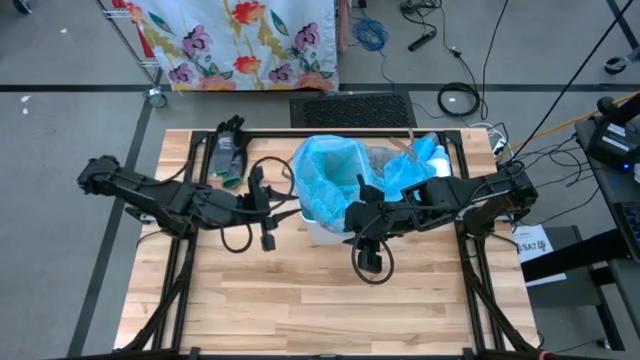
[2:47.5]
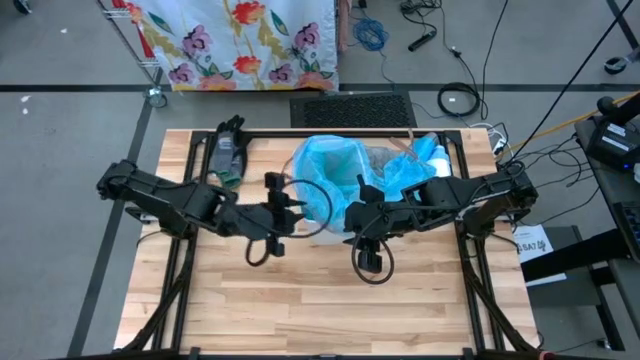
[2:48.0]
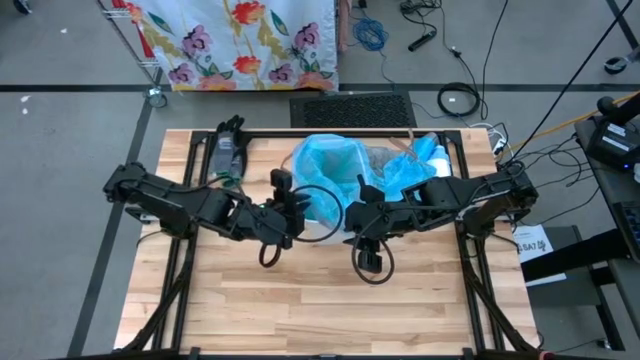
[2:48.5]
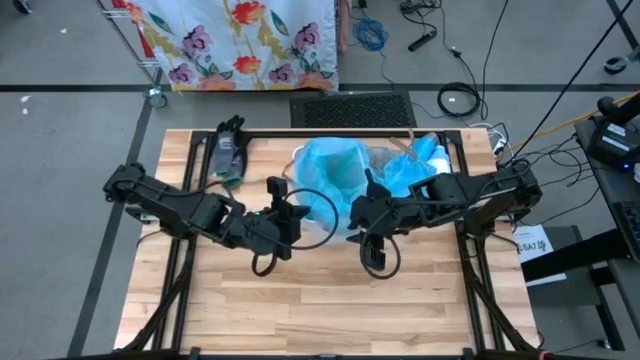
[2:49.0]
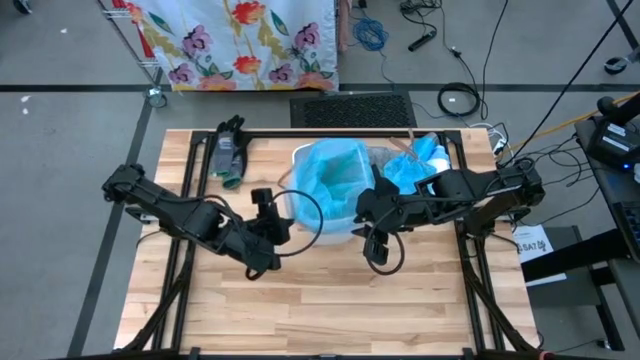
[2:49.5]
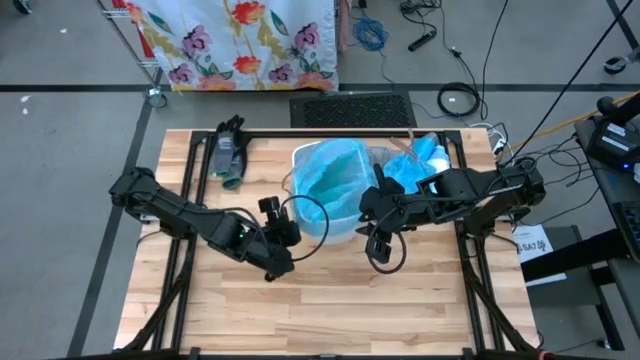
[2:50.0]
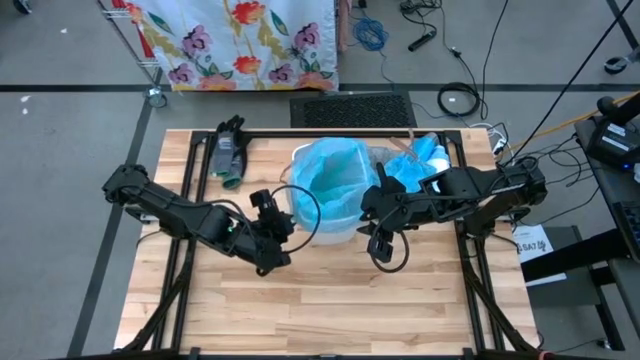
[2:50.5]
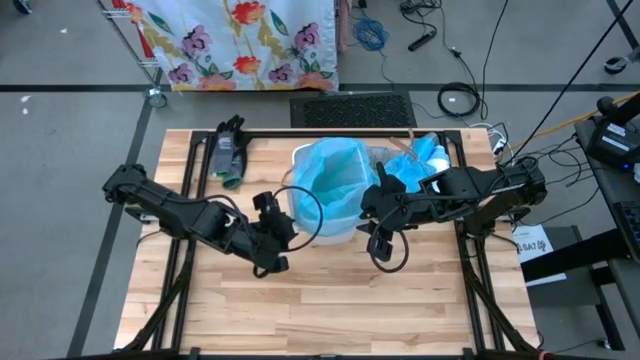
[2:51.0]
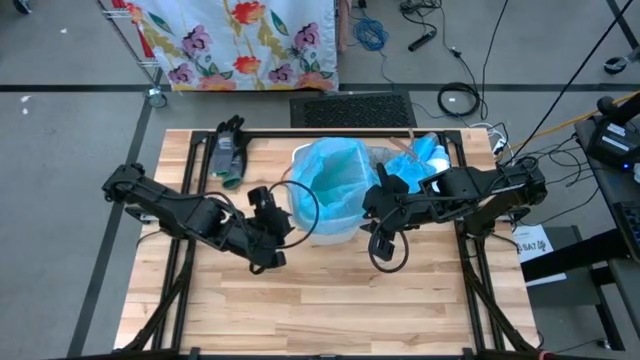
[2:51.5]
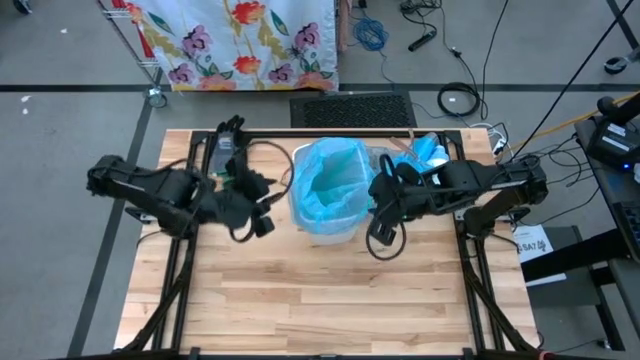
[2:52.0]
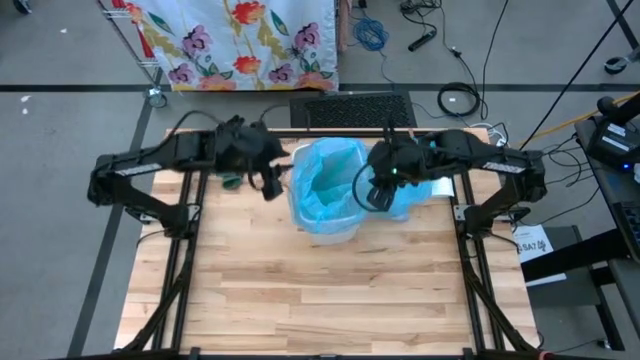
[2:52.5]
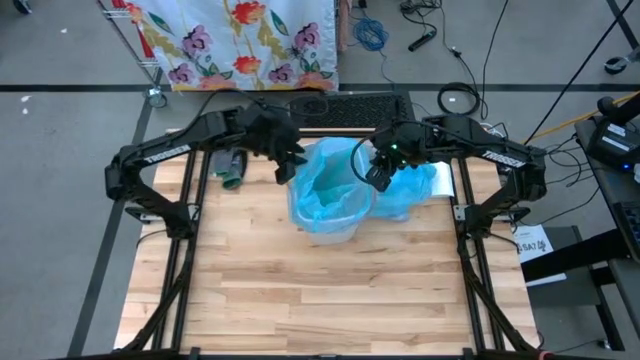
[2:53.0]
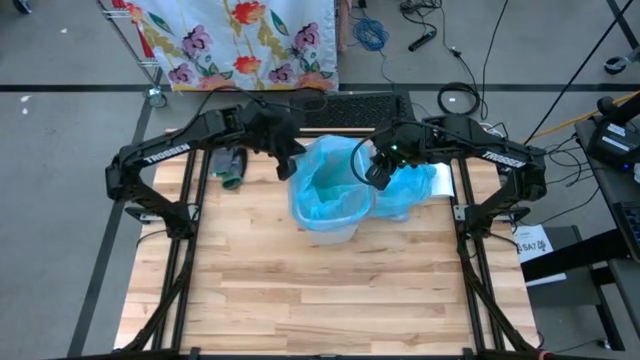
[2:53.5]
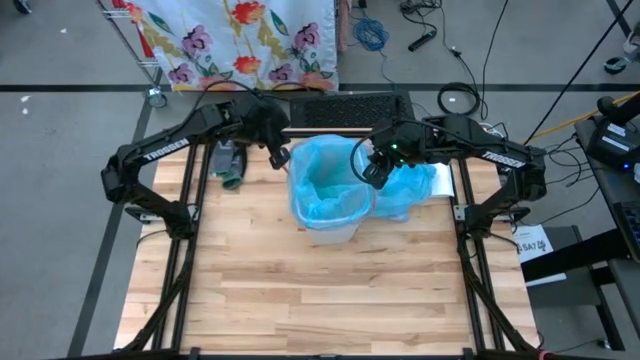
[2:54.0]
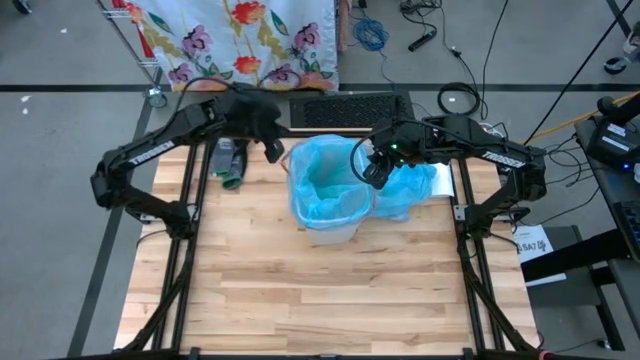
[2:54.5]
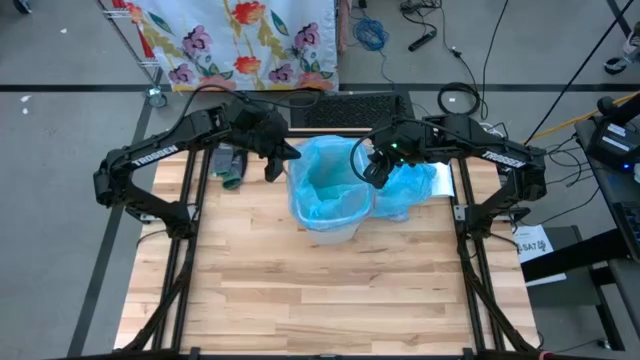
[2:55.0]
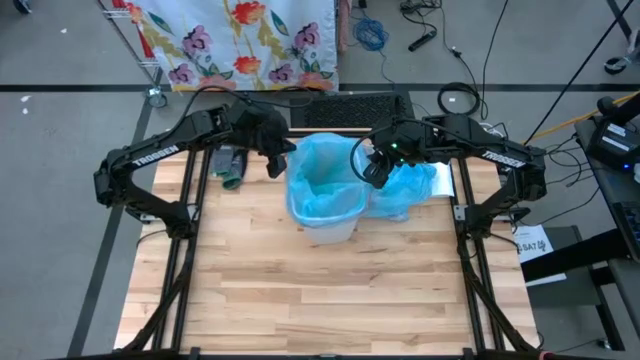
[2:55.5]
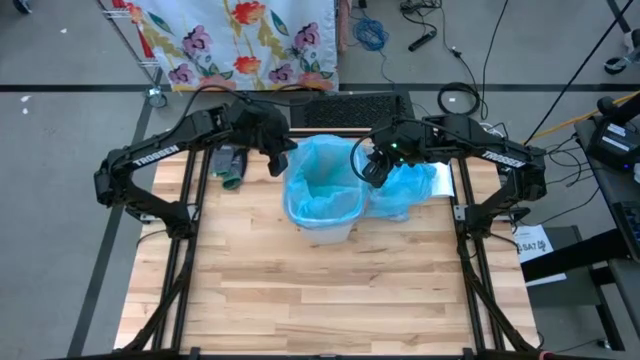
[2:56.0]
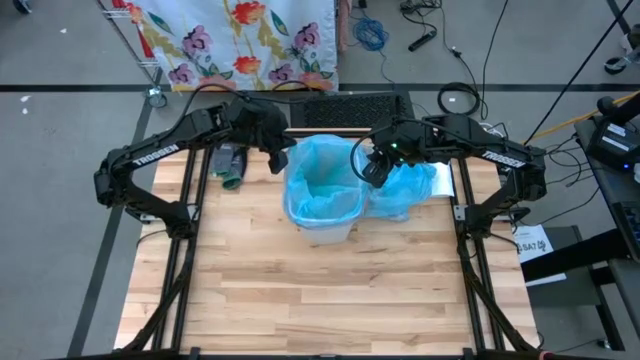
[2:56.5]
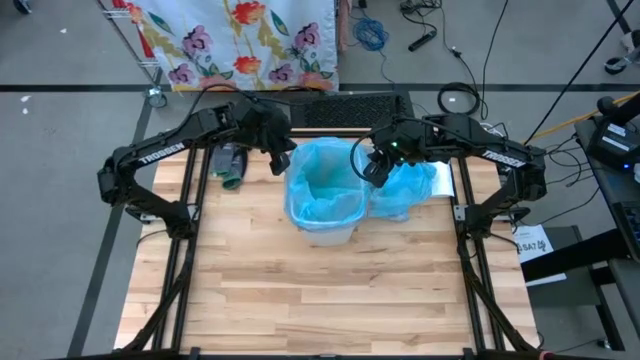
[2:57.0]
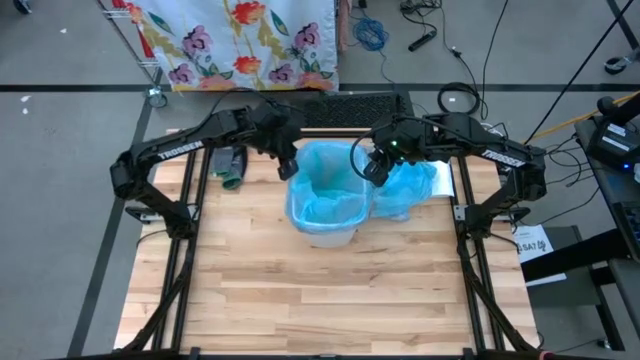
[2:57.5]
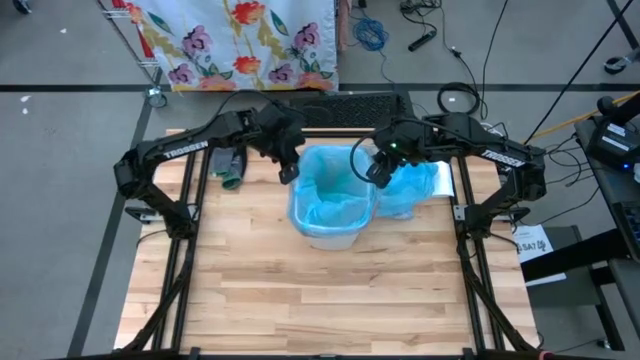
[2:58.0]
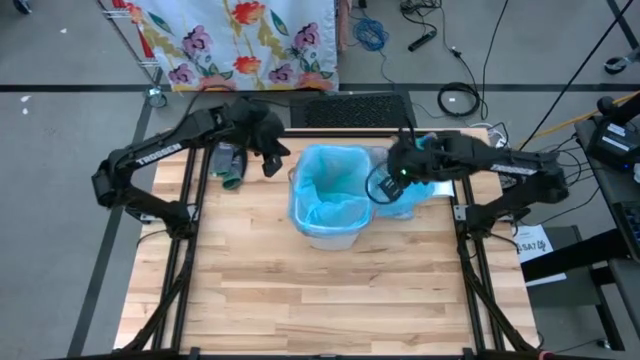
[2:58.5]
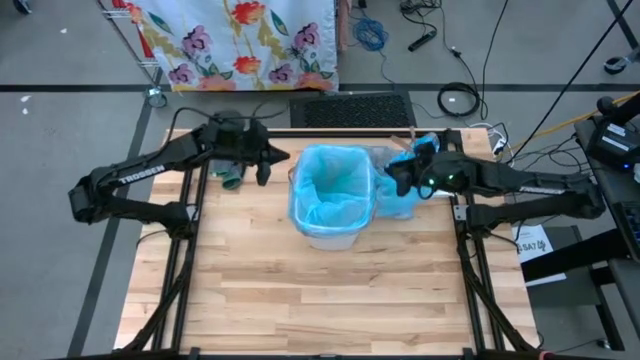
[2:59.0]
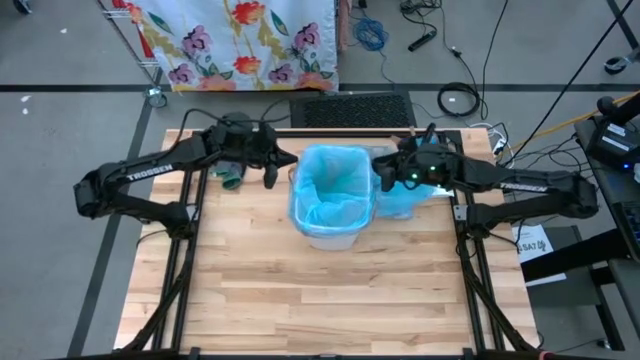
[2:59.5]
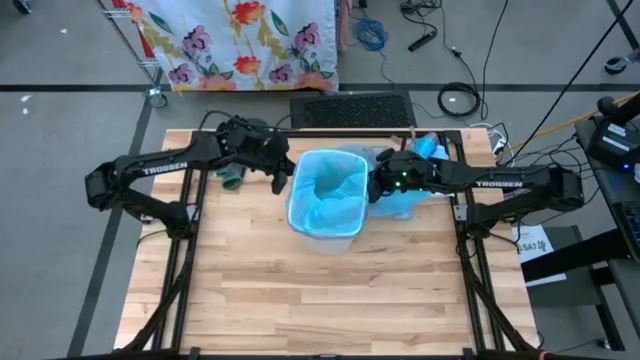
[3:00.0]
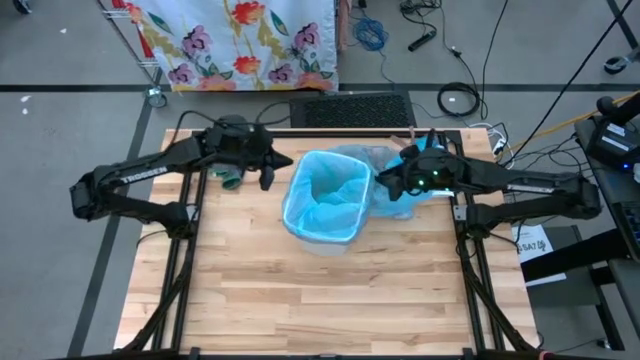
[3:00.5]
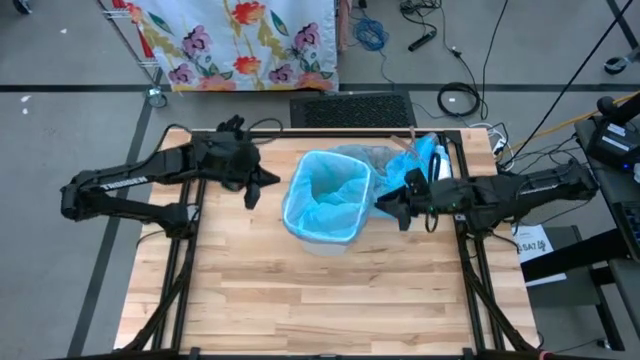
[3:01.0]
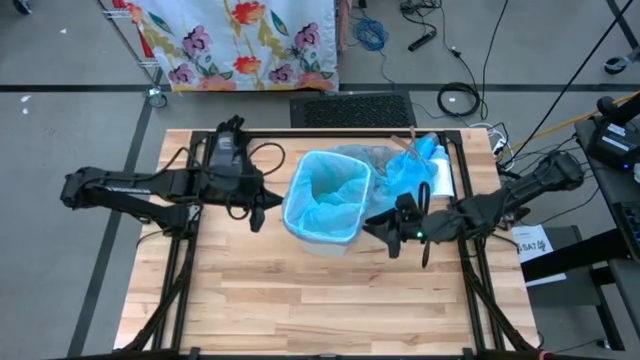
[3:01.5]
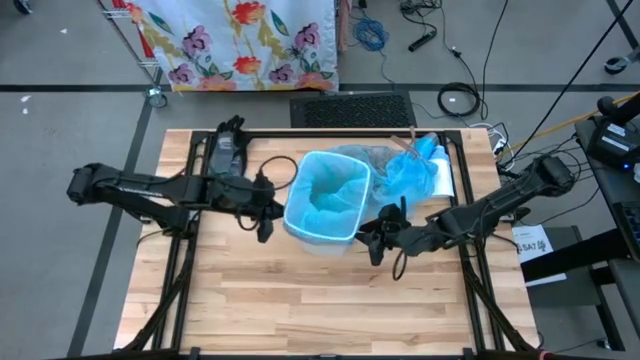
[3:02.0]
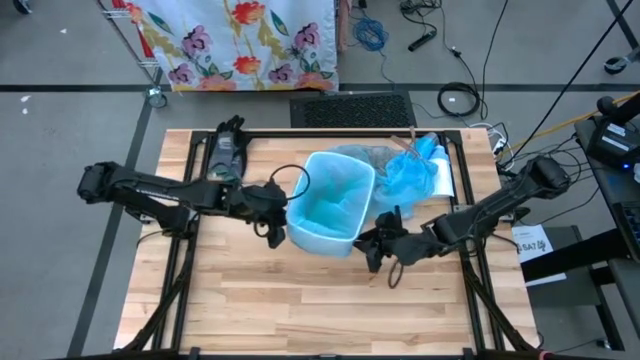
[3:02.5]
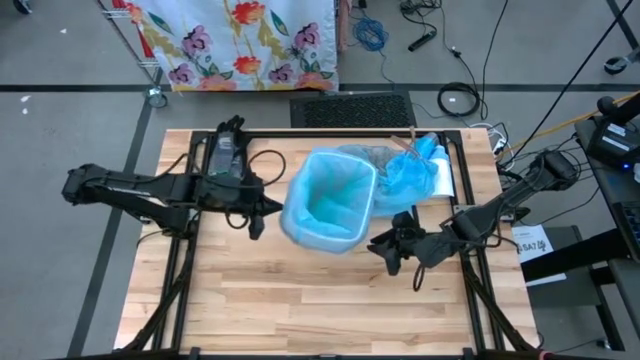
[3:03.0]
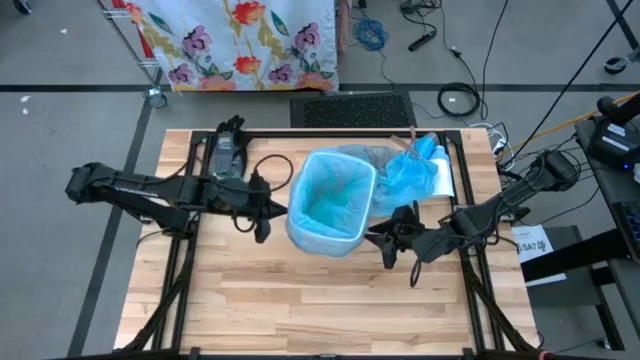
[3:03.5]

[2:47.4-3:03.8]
Task: place trash/remove bag and relplace
Insert the new blue trash bag into the trash bin

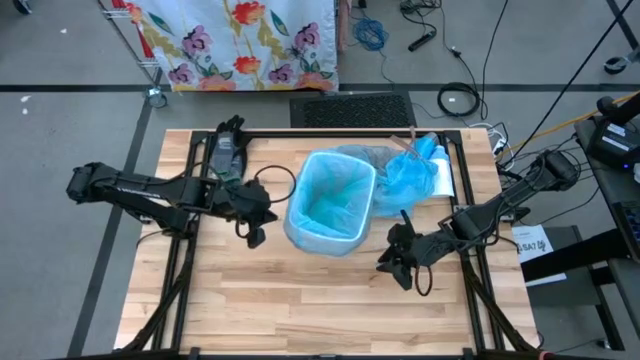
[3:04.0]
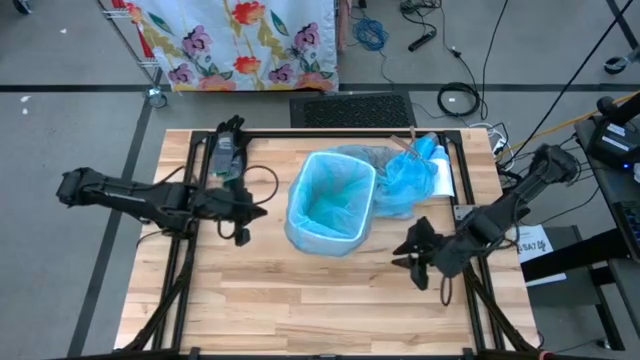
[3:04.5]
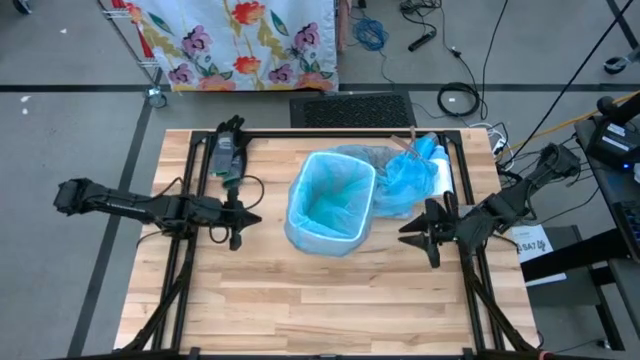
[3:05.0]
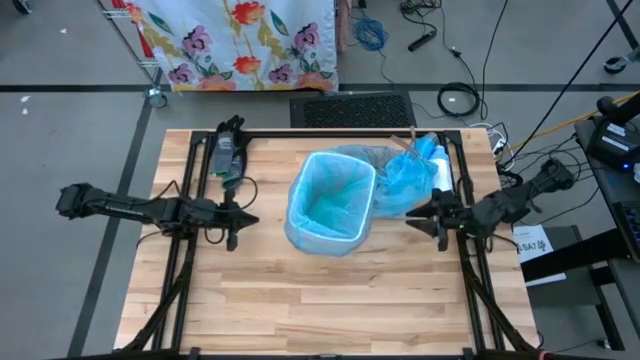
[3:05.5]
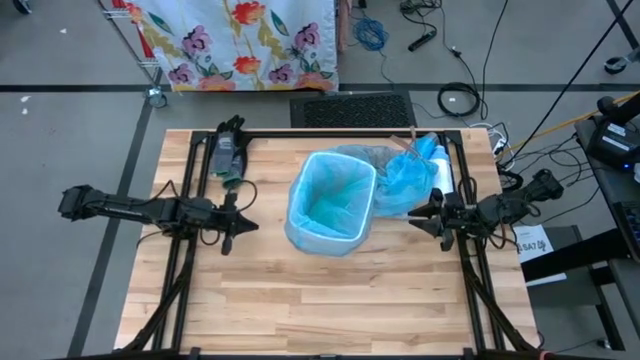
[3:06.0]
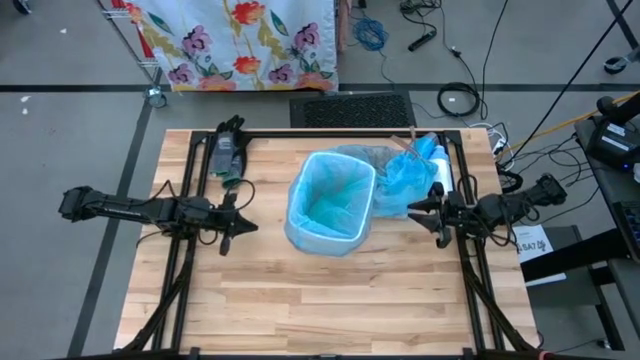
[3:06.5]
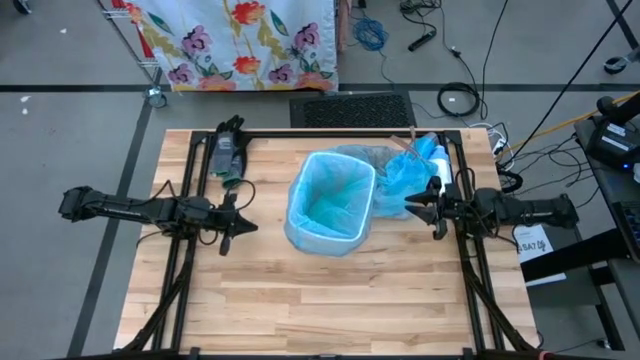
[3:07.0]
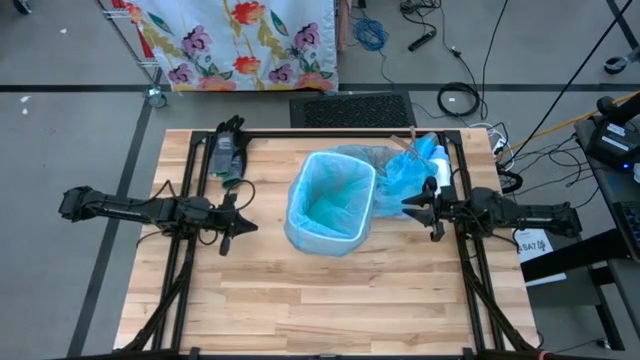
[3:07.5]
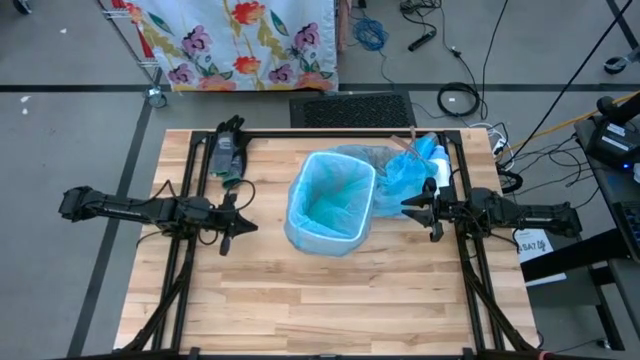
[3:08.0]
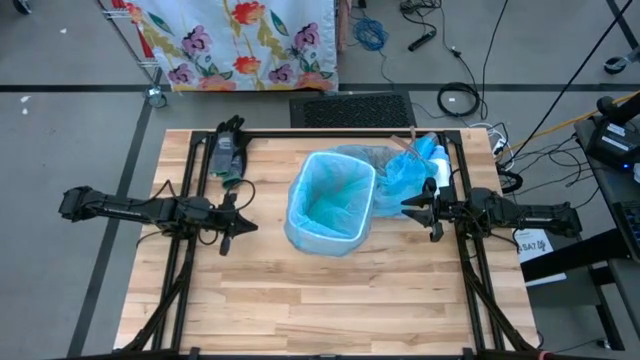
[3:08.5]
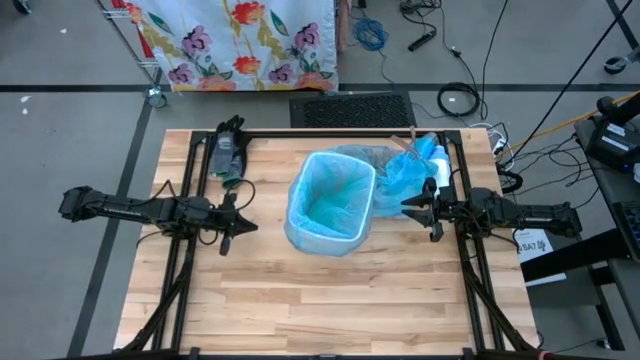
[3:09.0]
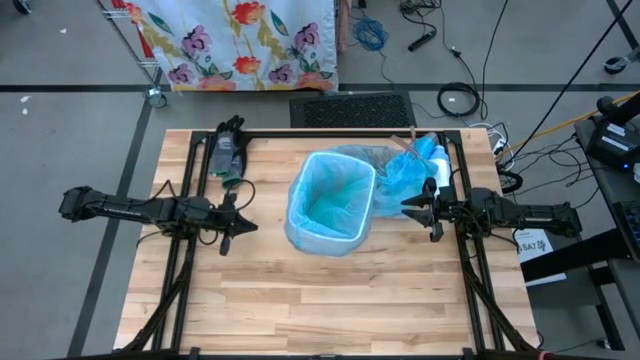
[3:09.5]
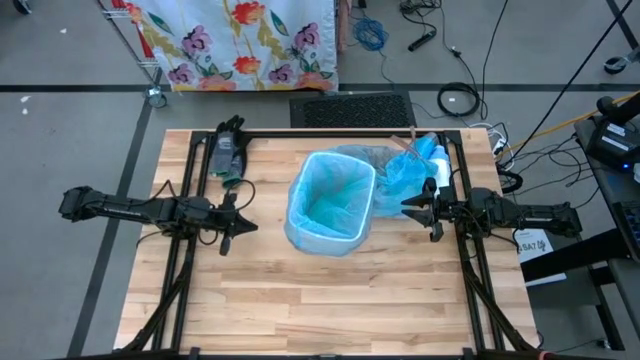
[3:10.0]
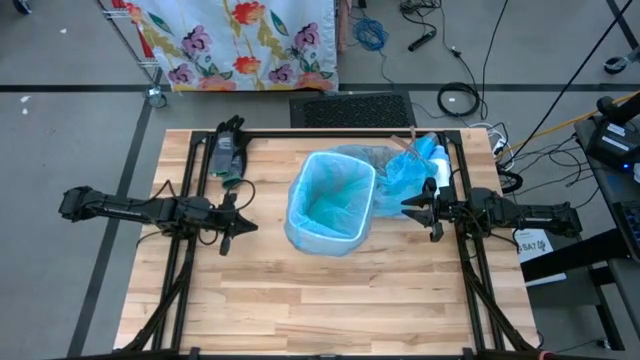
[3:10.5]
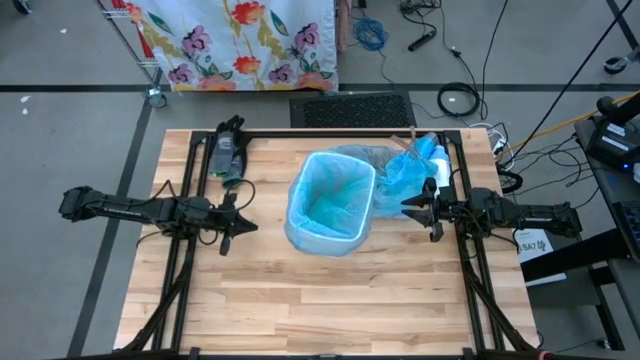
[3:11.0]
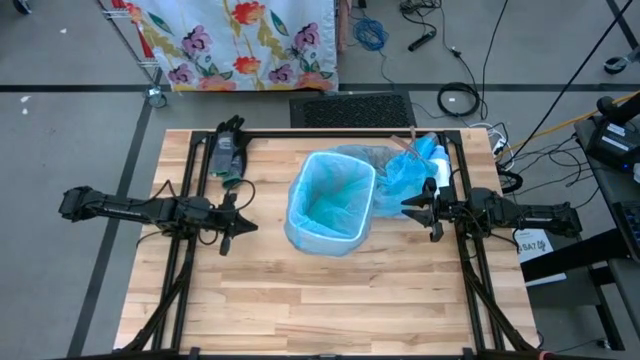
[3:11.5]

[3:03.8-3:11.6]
Return to Home Position
